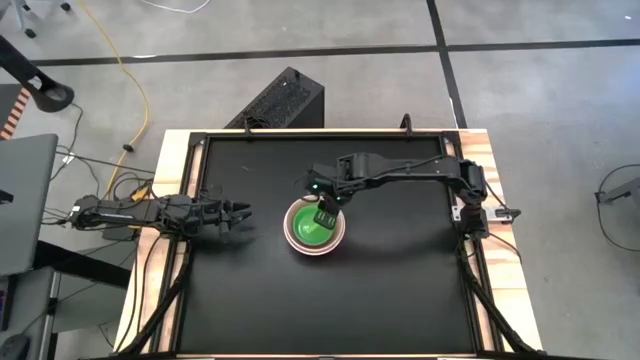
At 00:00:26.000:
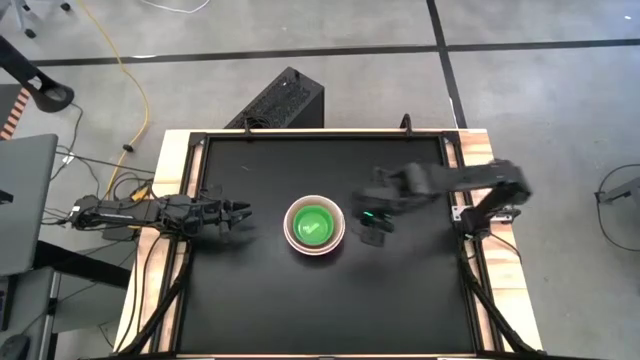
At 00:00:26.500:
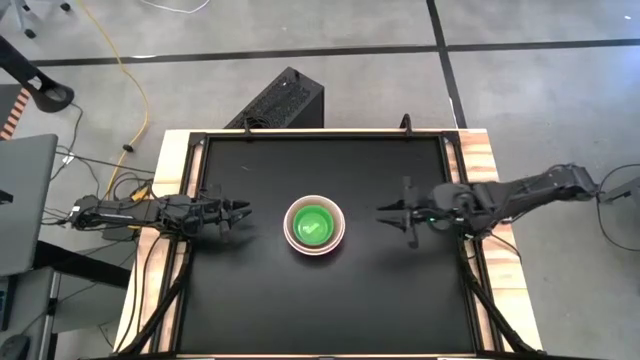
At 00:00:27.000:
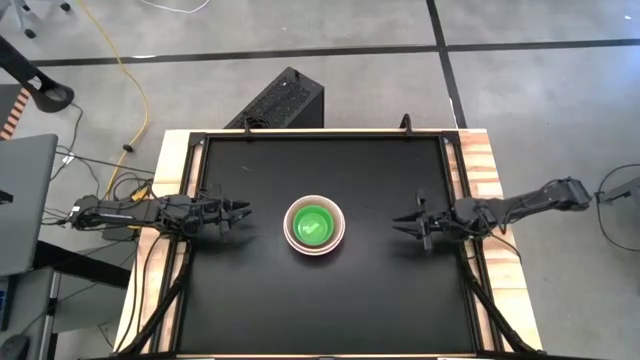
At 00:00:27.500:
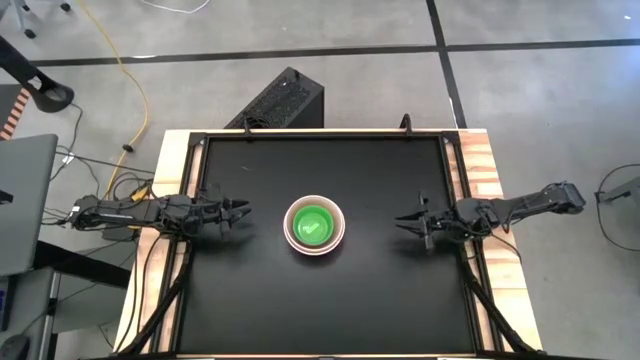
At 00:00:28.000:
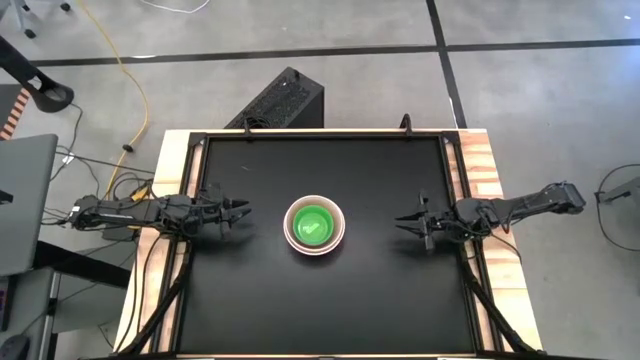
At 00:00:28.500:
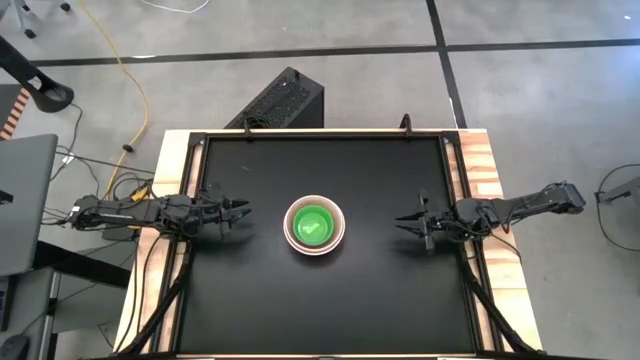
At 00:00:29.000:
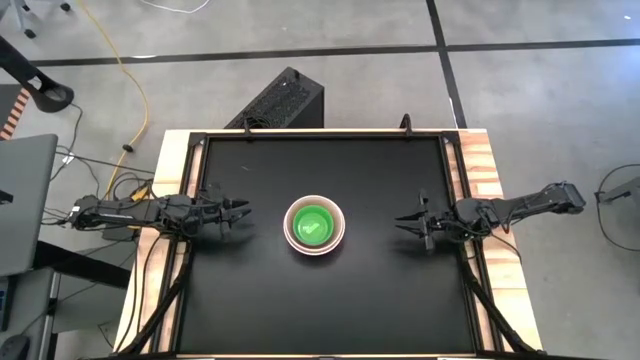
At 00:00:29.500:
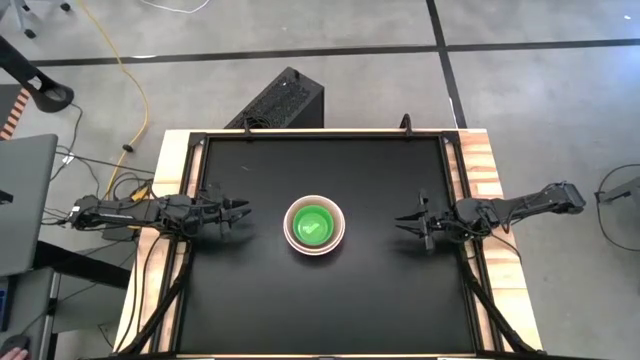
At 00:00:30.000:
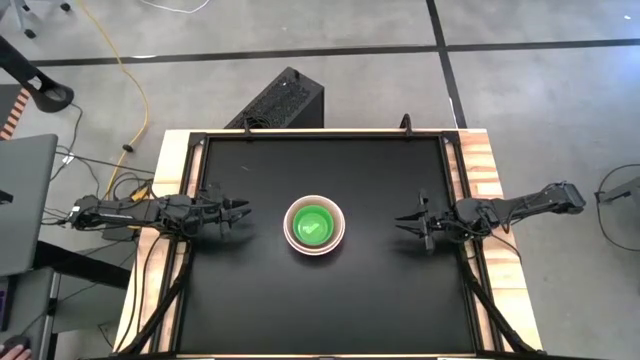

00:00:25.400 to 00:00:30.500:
Task: Nest bowls inside each other by size order
Return to Home Position

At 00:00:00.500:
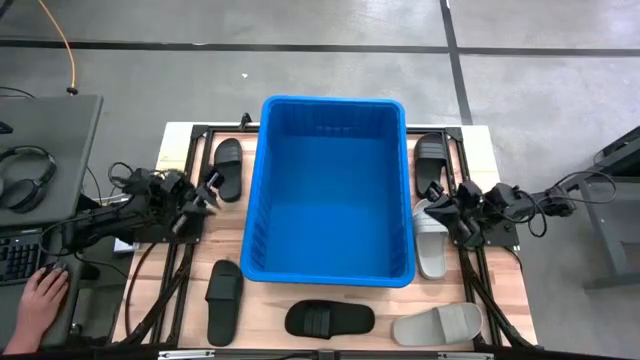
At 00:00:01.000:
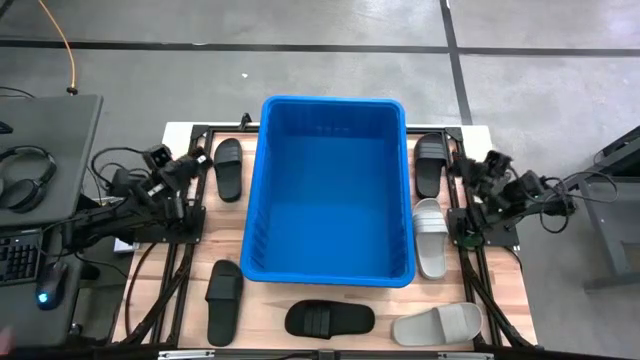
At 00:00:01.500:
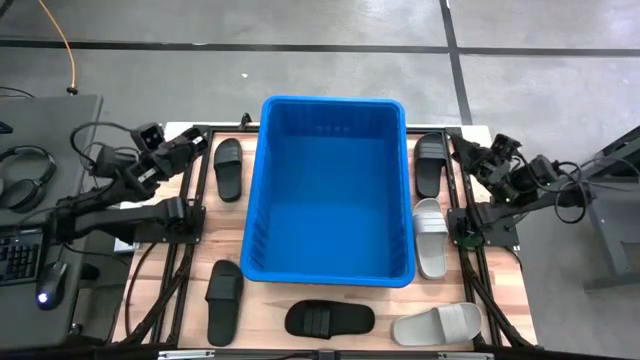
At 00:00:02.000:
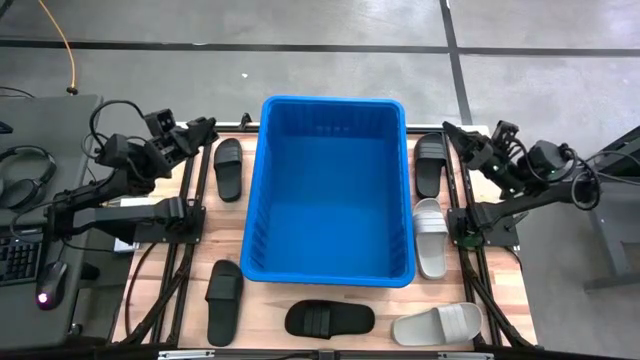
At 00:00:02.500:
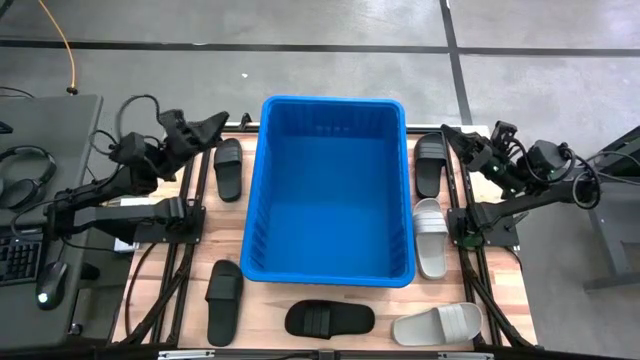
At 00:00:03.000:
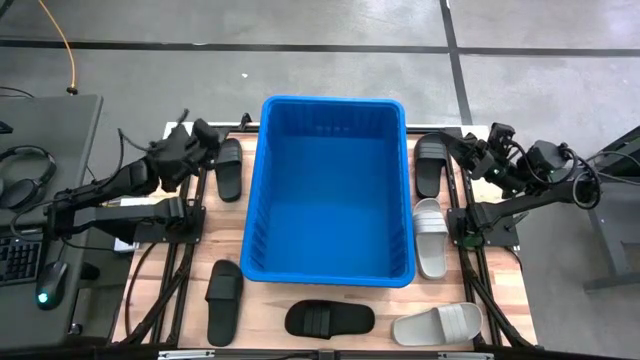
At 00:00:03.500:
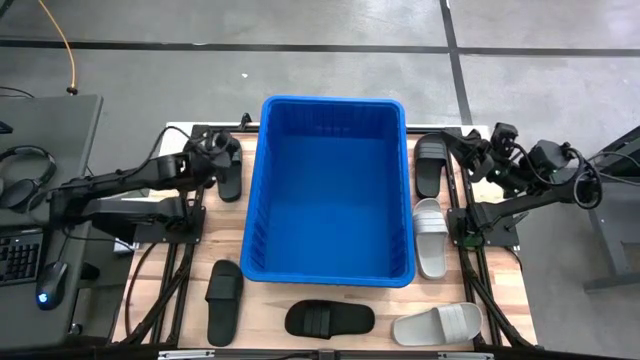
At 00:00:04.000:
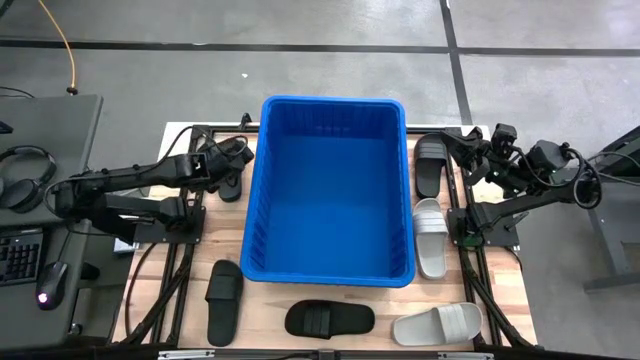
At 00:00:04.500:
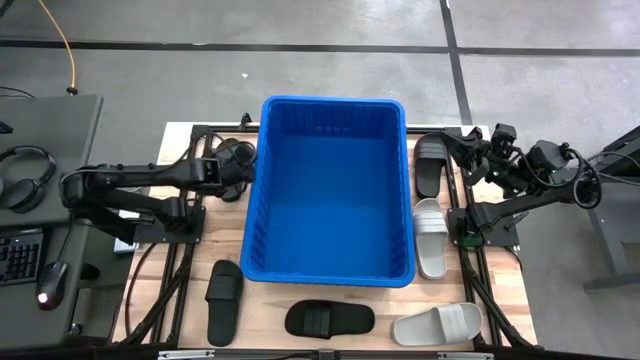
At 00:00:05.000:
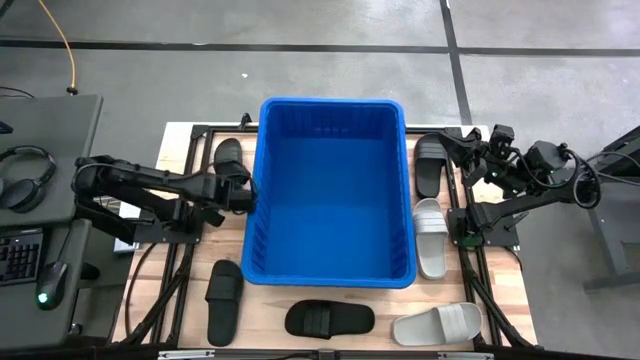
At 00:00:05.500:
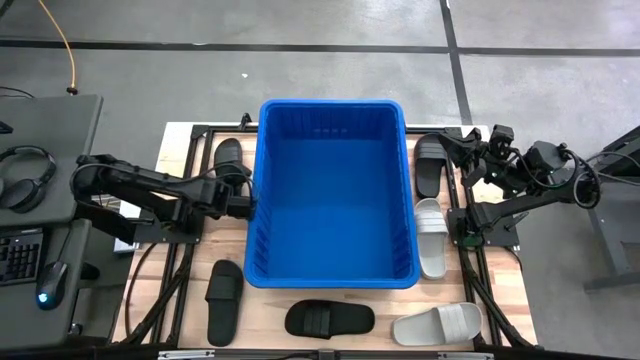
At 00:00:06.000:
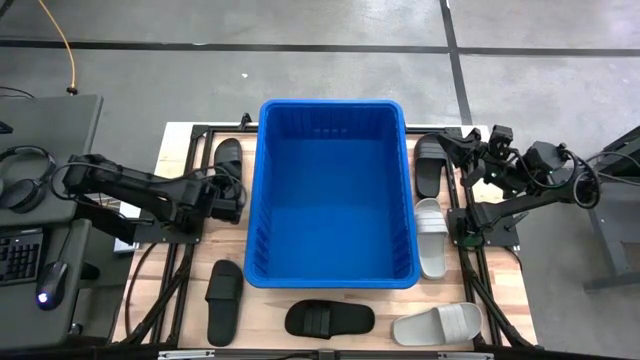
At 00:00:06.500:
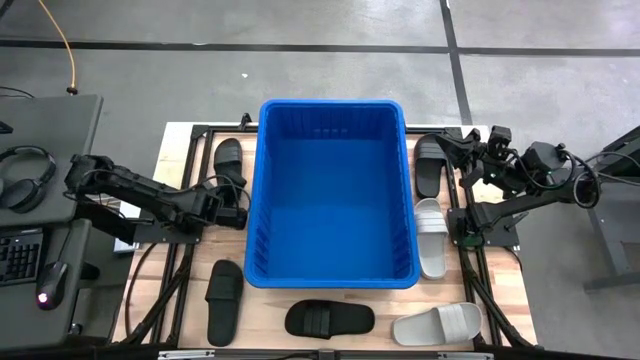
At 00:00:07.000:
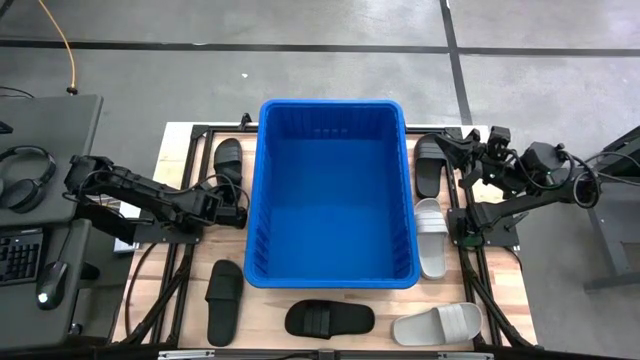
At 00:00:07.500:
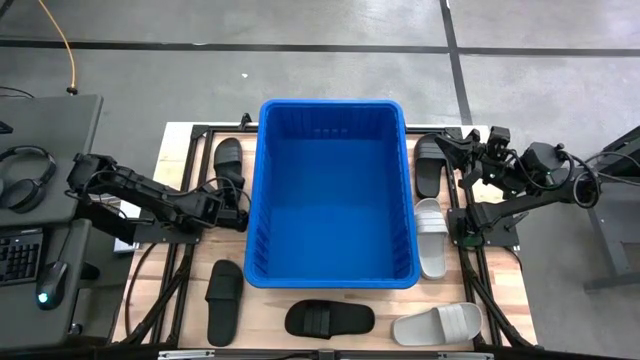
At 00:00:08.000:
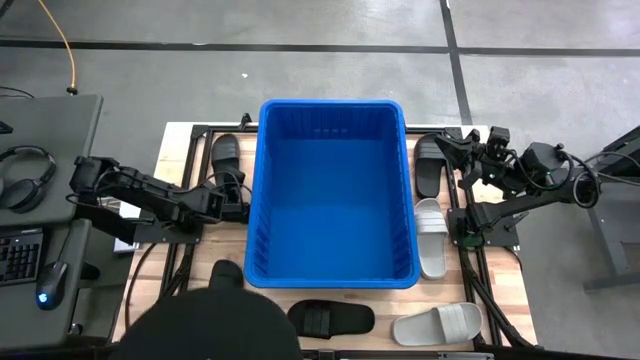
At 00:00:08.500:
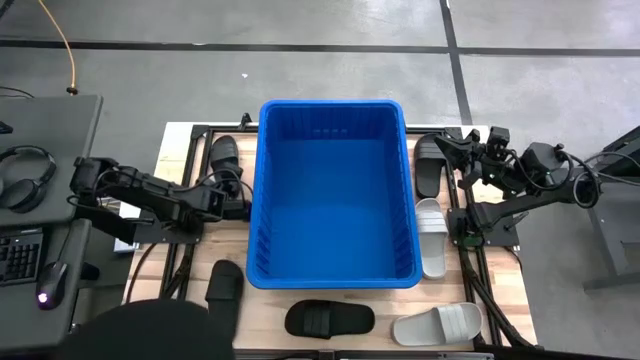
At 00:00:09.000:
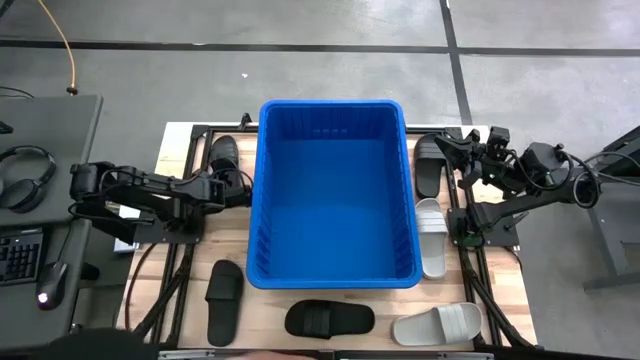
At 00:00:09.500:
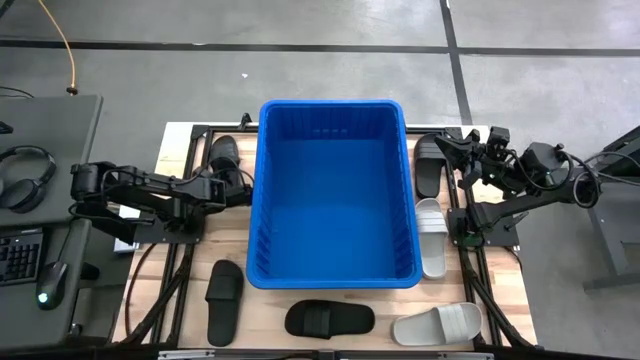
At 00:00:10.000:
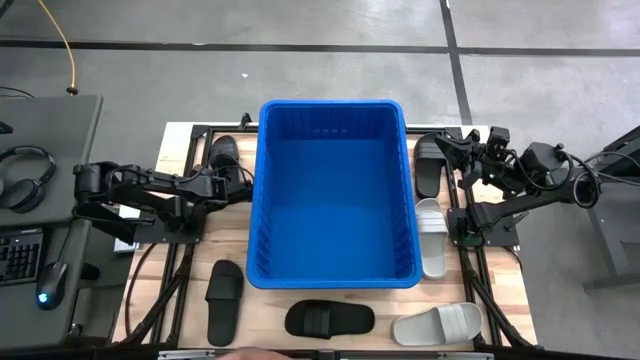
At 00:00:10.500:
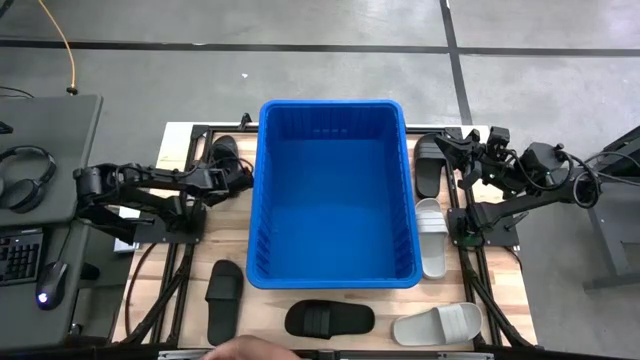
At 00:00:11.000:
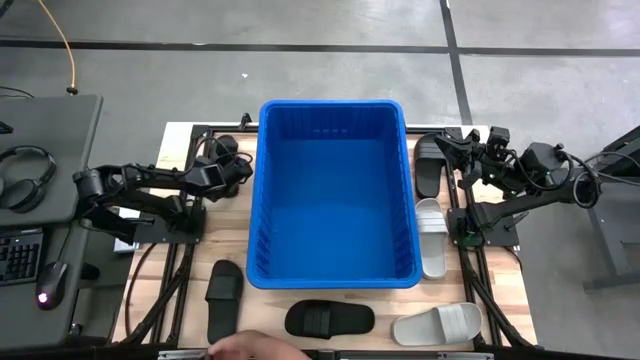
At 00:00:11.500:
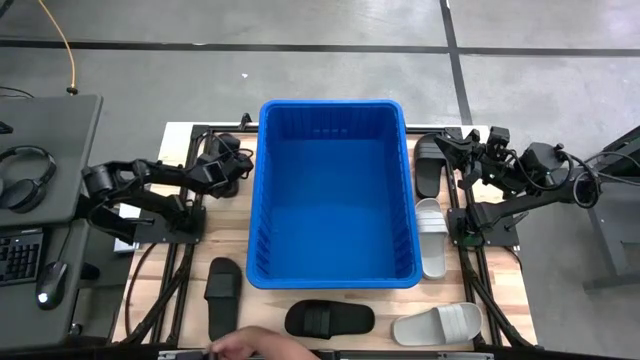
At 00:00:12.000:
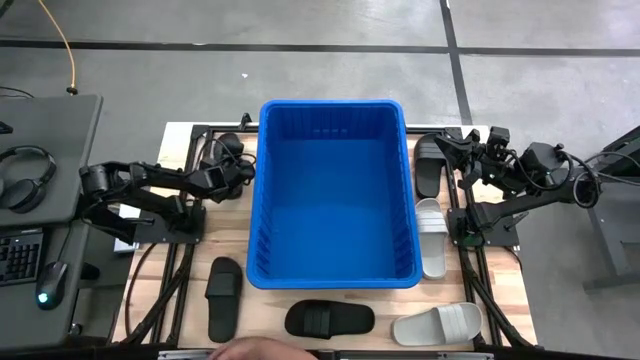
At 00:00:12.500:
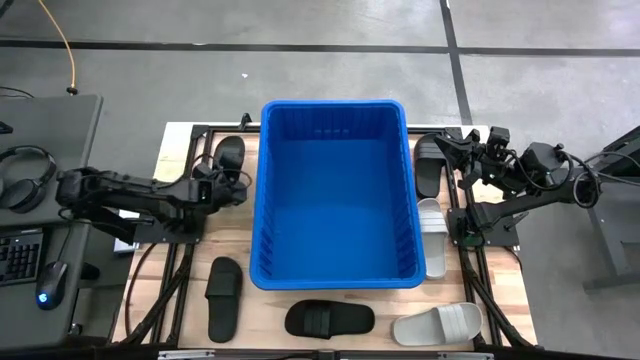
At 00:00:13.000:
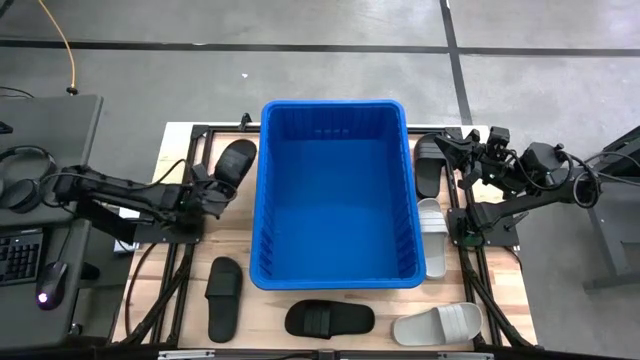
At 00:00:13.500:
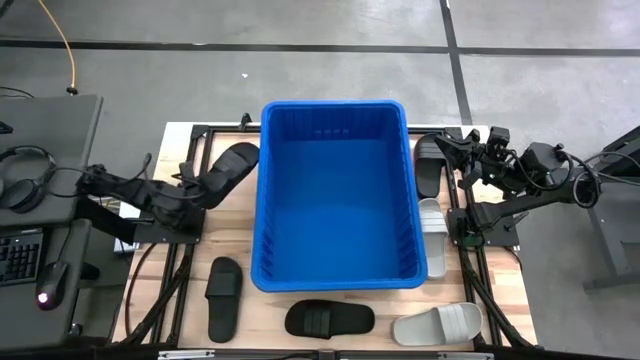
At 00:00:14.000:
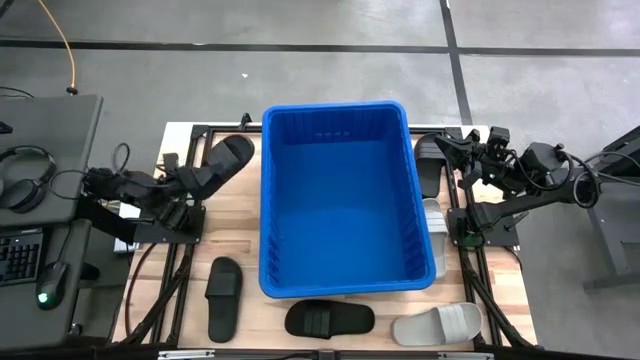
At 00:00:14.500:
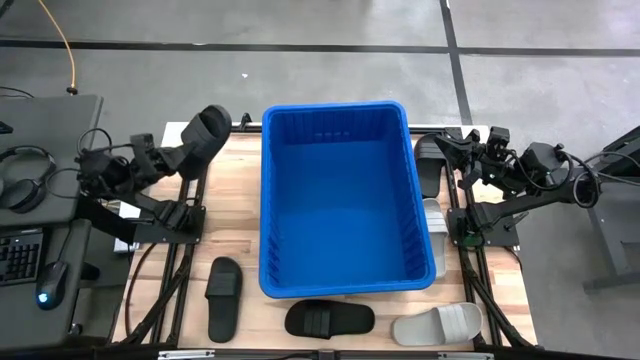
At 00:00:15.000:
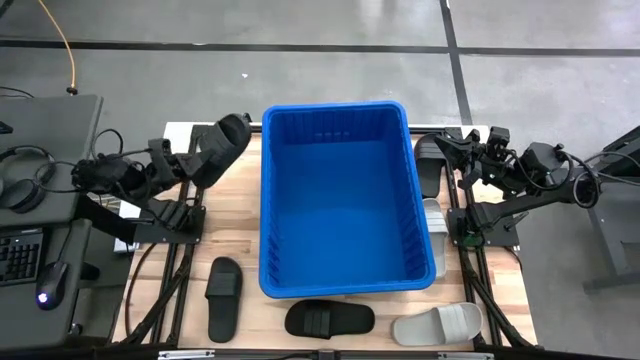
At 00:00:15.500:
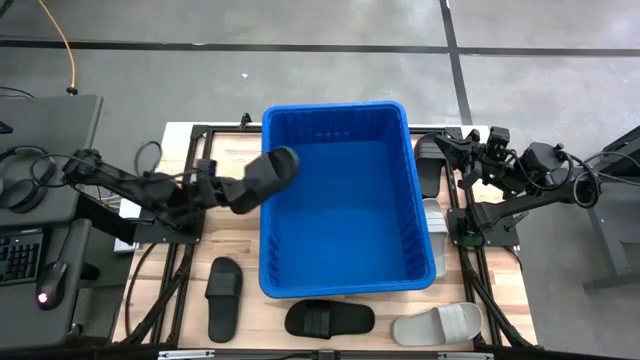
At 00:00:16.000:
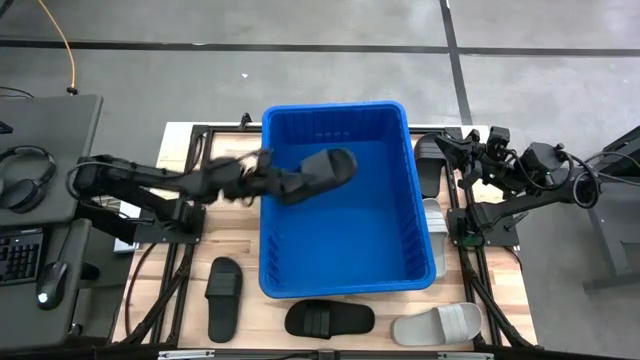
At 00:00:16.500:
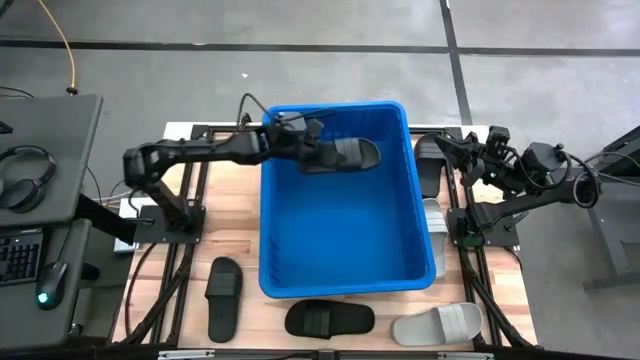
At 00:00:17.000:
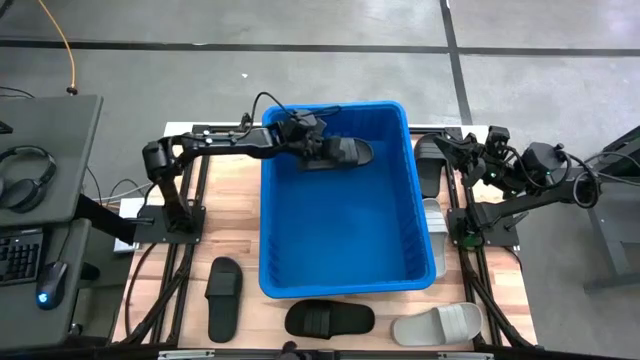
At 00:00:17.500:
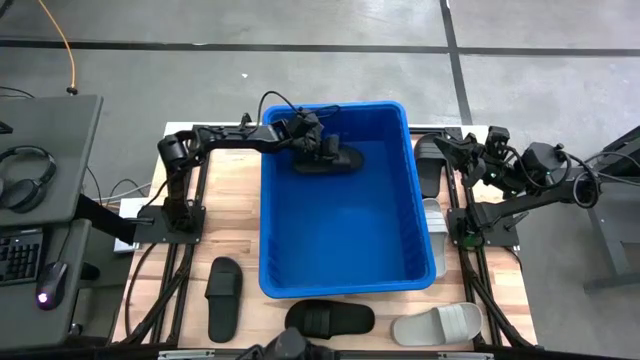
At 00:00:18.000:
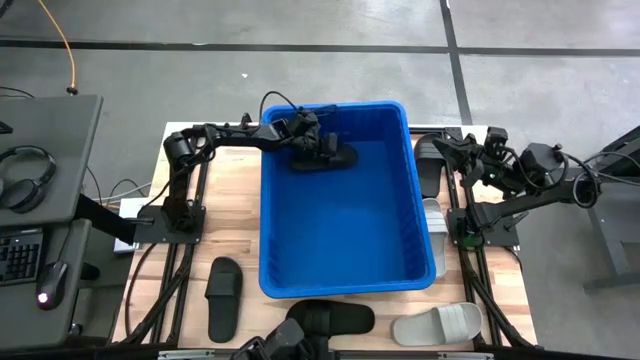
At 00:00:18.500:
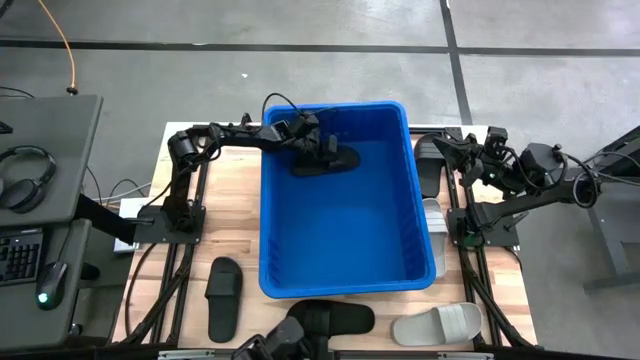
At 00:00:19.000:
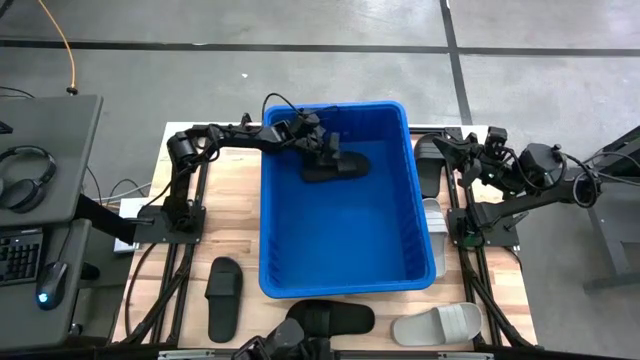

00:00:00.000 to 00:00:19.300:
Task: Pick and place slides into bin
Put the black slide into the blue container
